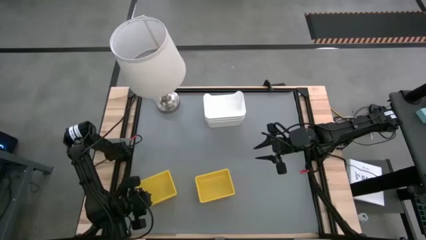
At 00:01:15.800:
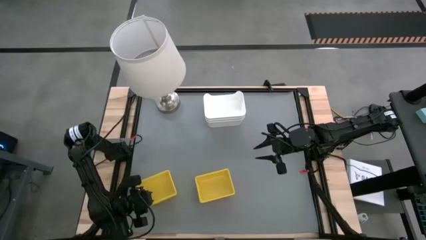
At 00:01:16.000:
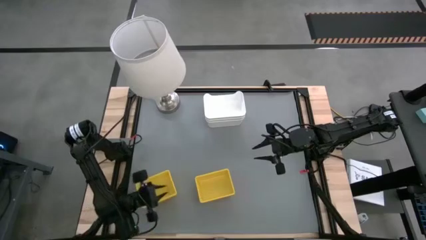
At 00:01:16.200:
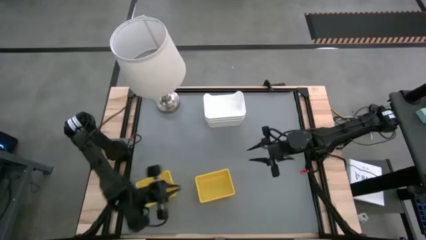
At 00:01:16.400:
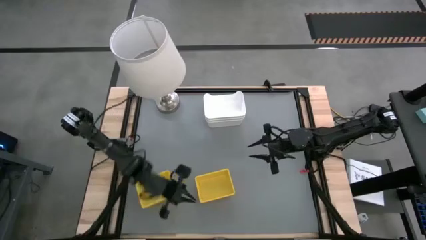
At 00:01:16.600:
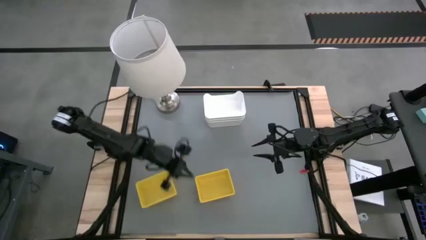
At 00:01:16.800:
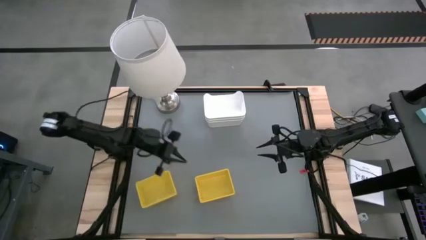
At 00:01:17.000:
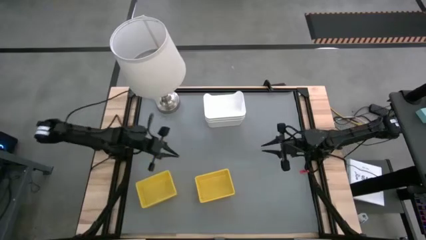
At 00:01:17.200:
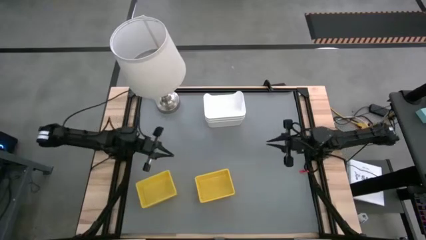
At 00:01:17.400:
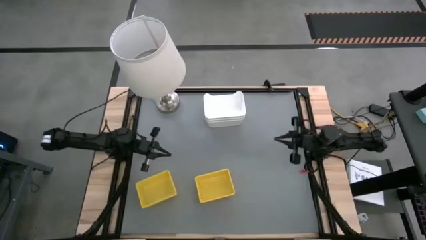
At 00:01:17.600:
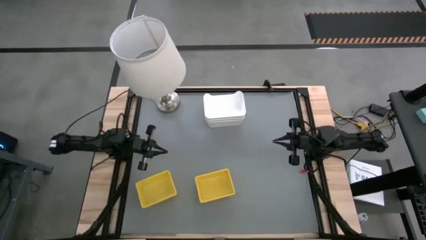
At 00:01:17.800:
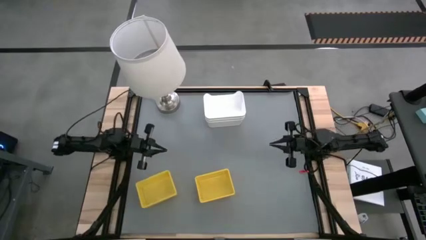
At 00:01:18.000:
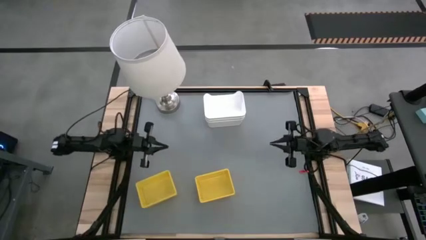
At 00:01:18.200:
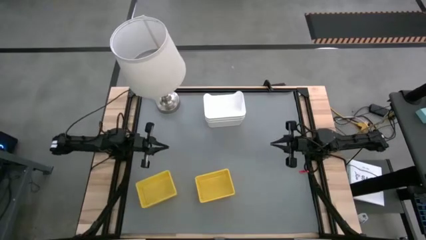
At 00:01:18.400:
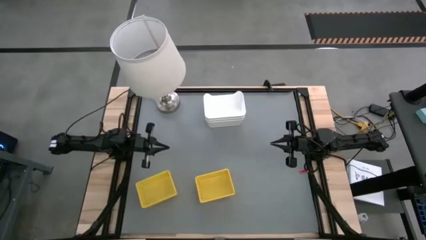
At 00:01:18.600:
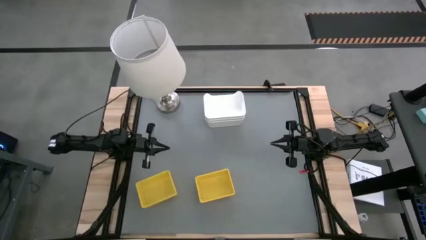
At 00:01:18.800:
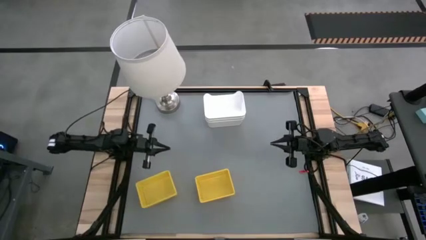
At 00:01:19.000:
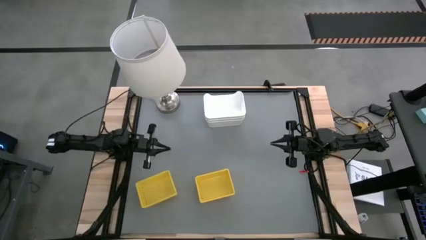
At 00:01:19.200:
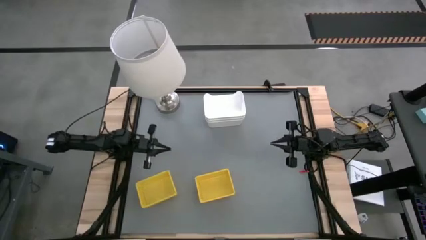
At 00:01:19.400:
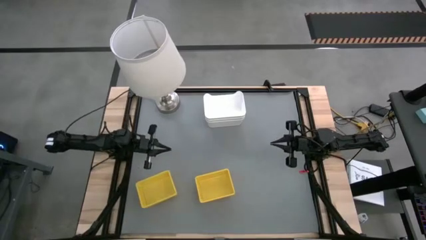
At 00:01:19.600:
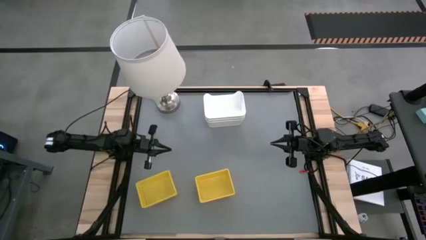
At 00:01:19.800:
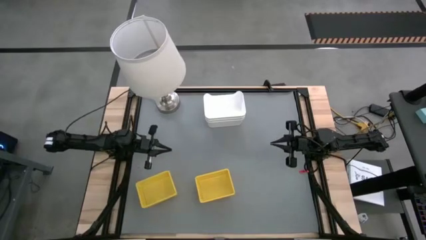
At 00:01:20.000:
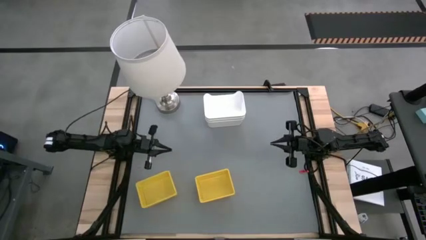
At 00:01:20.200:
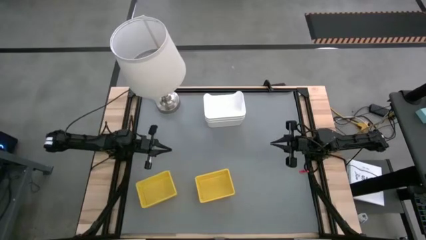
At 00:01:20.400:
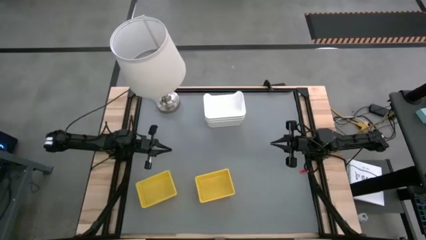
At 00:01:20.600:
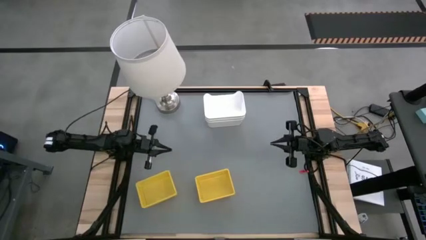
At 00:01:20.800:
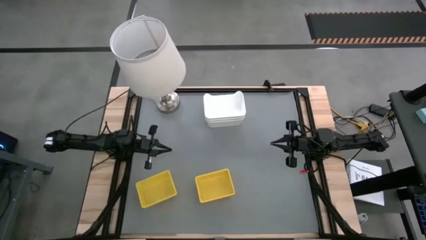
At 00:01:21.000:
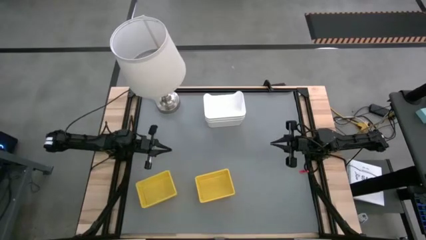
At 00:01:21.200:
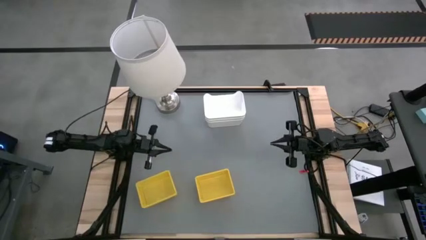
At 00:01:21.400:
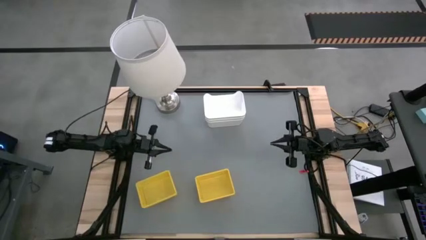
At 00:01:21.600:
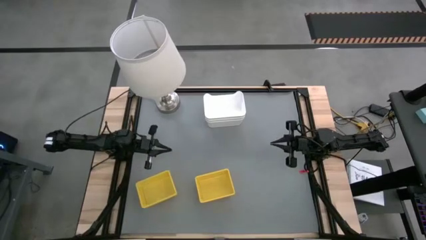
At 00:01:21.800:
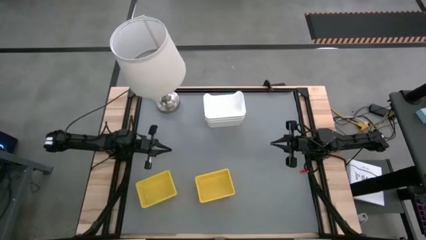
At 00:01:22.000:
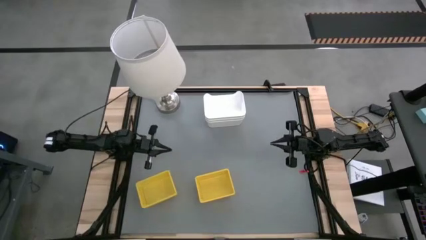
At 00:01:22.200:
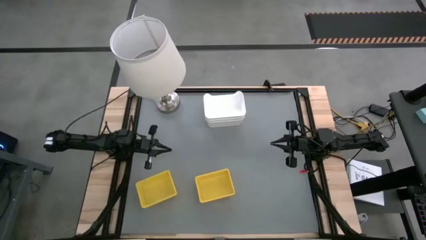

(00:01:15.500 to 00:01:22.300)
Return to Home Position

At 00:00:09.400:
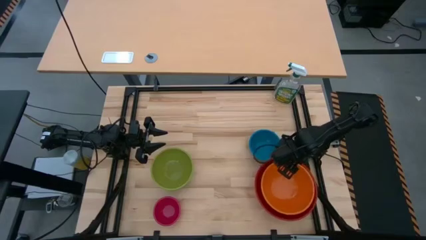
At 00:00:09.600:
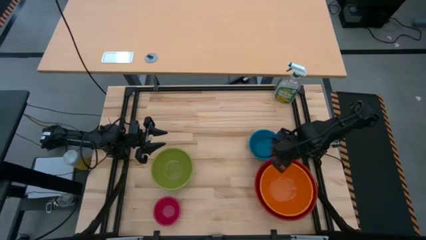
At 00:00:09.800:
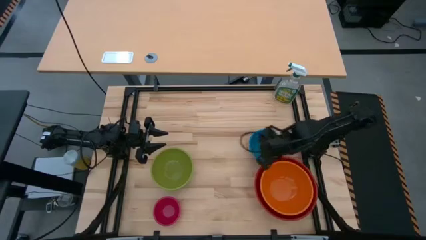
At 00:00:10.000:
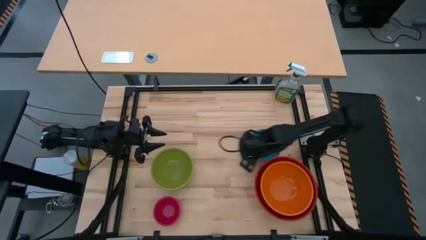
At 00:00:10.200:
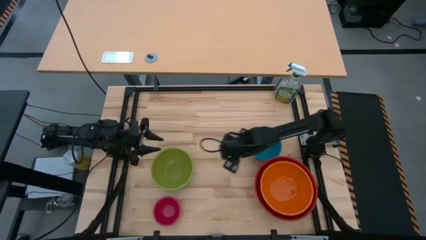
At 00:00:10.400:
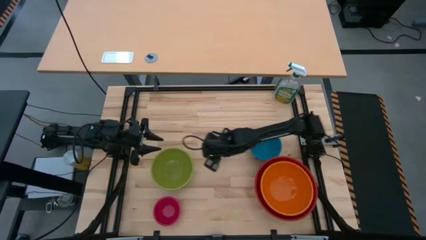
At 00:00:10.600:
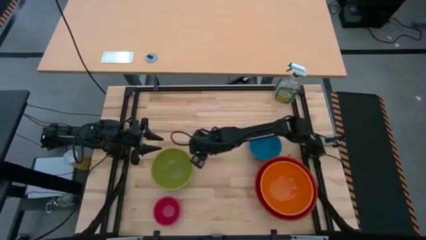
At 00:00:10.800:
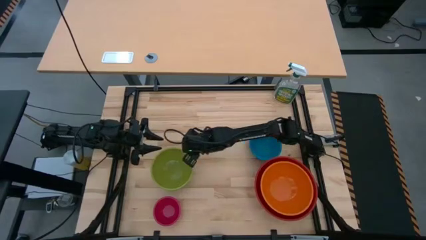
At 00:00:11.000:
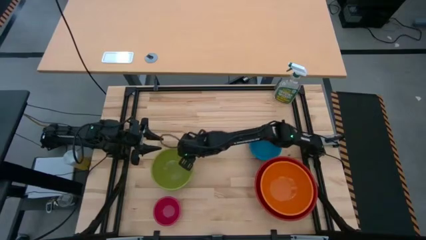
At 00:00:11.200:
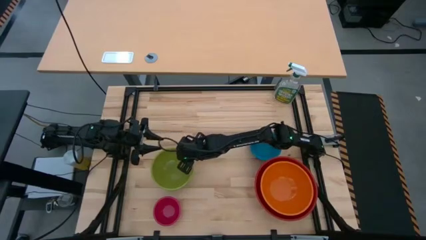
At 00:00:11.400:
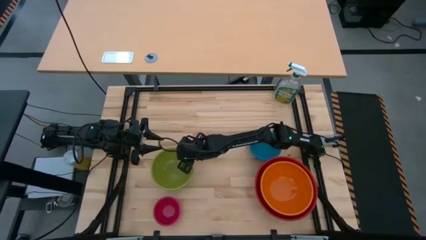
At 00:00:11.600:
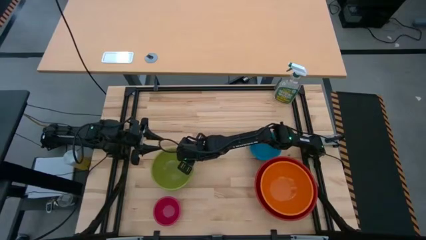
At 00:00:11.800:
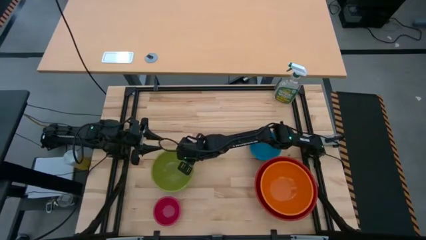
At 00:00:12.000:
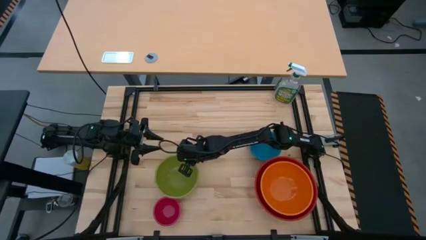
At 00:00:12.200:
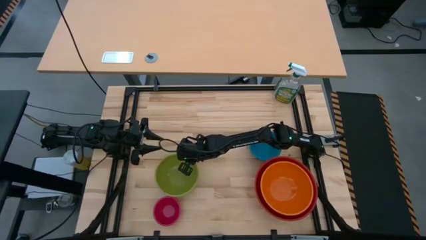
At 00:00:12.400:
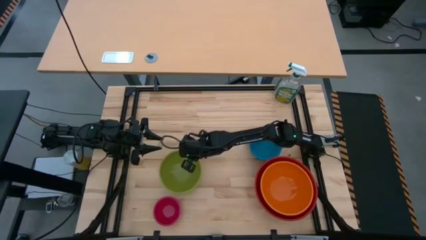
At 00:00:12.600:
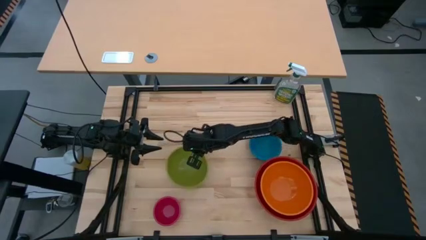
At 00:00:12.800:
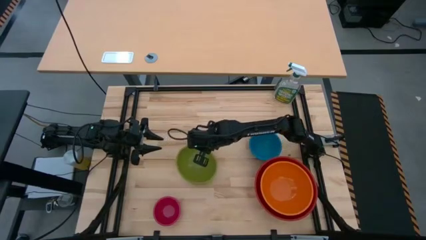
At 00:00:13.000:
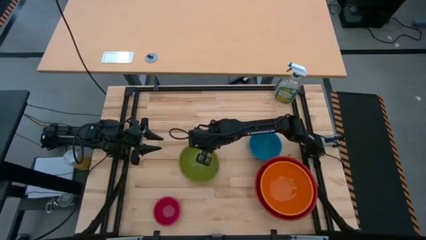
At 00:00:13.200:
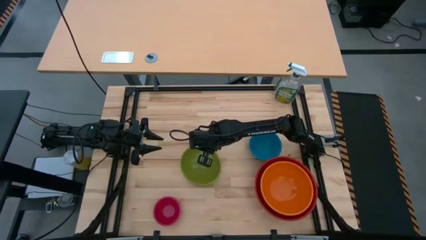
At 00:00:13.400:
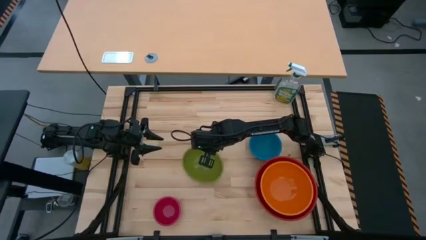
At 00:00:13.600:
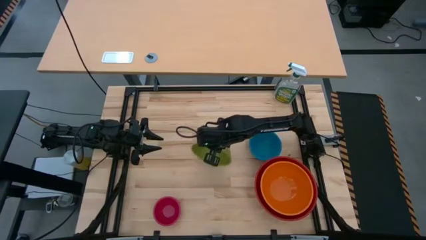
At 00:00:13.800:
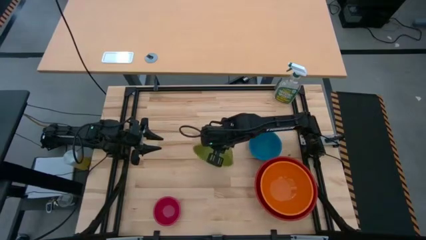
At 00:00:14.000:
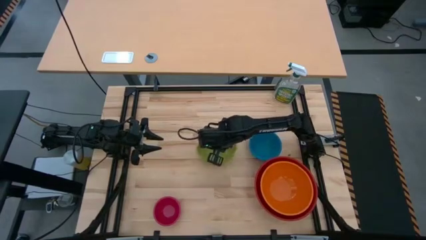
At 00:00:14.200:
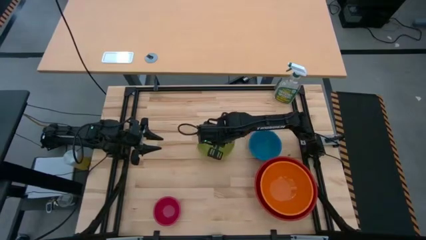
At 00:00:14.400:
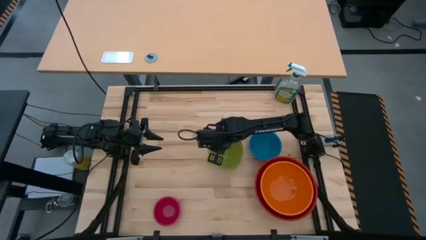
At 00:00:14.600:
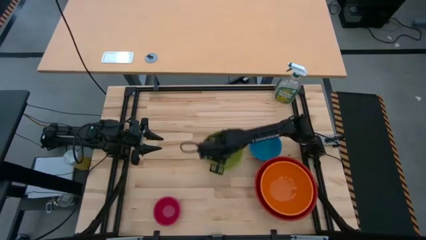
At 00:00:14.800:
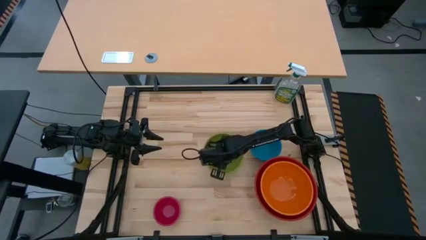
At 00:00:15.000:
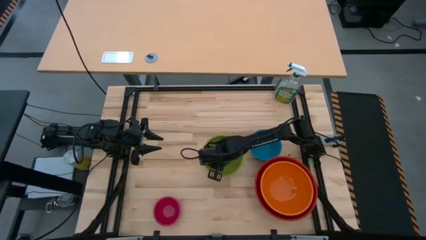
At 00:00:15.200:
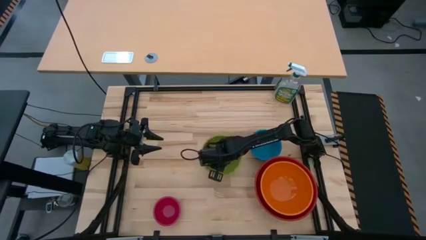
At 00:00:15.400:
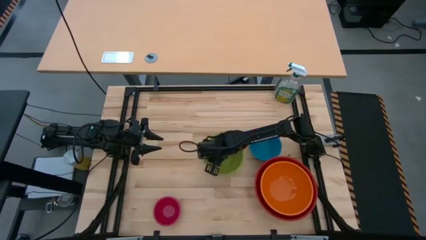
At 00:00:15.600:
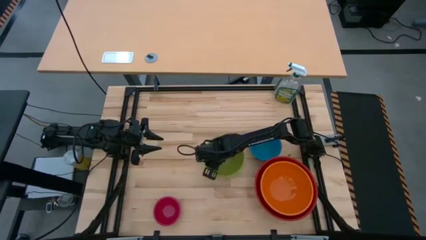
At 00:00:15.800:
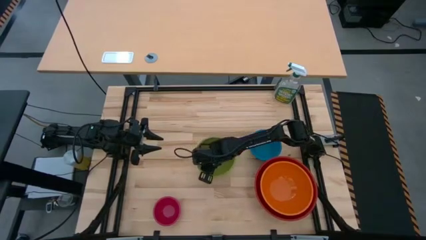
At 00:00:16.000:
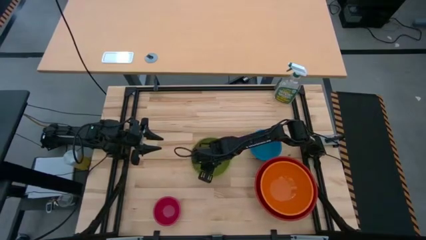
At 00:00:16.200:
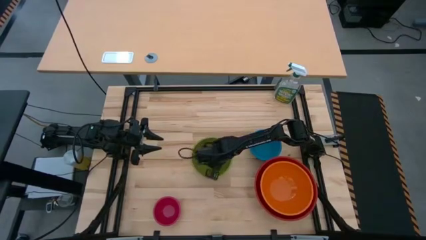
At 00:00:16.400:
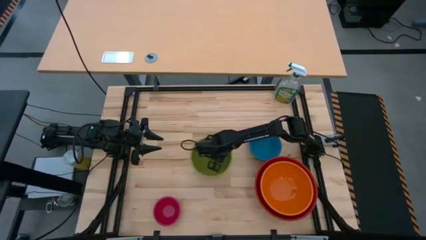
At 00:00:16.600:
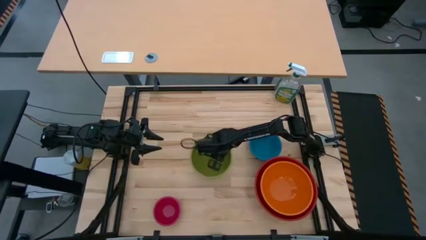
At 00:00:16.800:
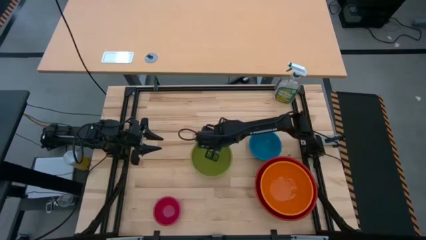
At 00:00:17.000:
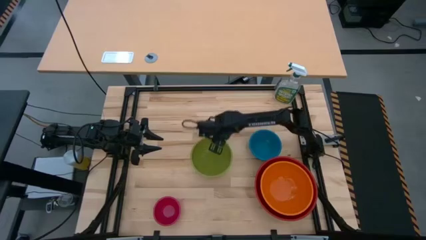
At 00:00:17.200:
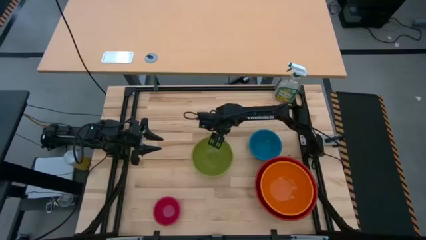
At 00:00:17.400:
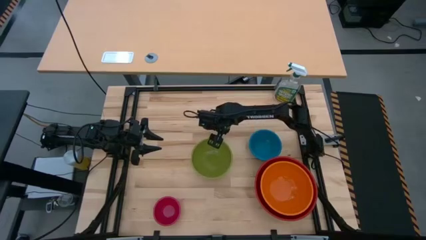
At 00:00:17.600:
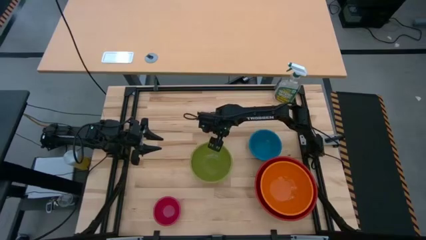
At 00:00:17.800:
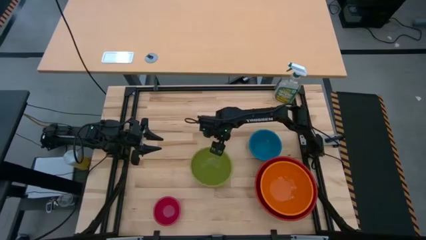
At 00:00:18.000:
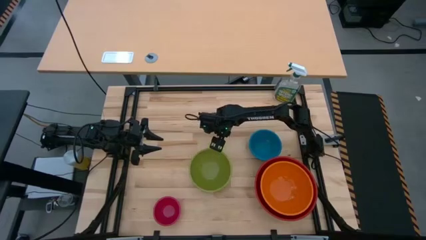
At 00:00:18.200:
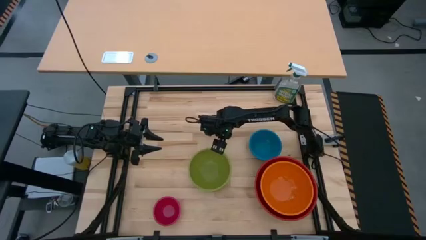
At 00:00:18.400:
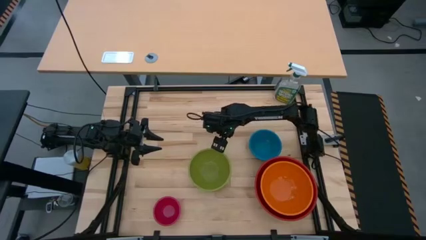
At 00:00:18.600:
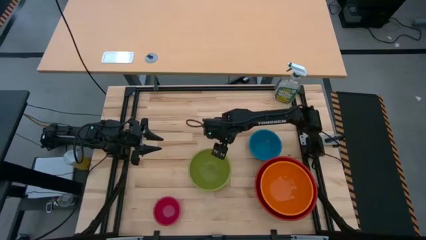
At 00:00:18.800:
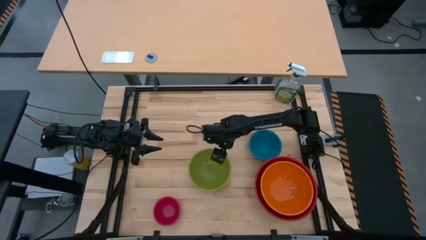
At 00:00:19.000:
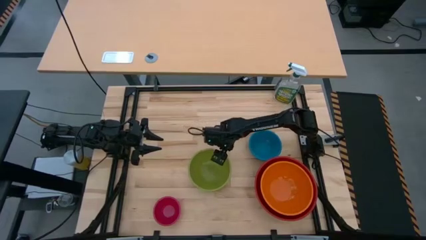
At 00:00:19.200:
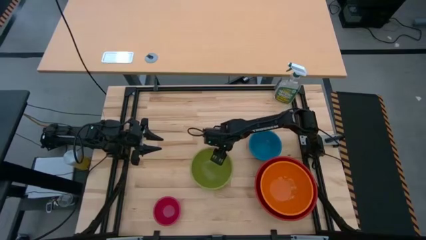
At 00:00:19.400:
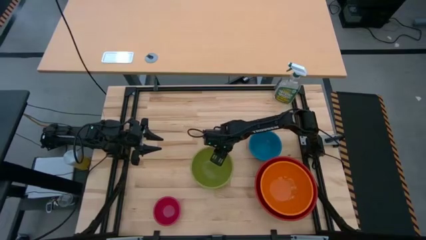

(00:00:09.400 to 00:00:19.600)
Stack the green bowl on top of the orange bowl

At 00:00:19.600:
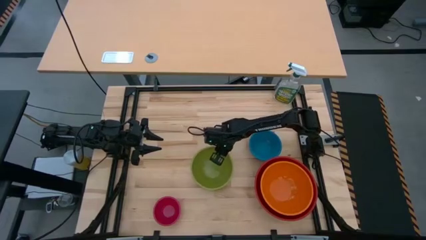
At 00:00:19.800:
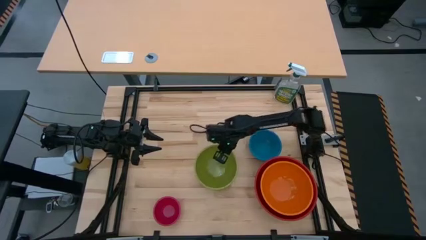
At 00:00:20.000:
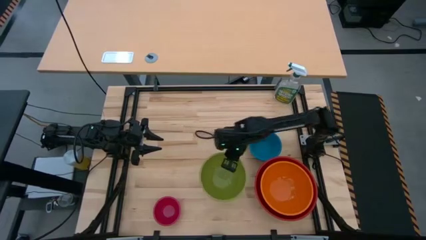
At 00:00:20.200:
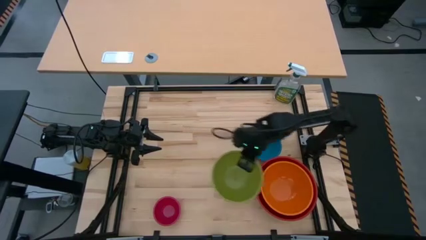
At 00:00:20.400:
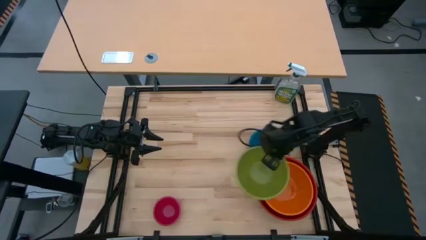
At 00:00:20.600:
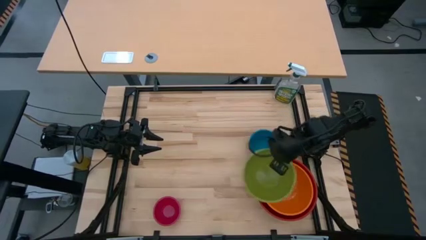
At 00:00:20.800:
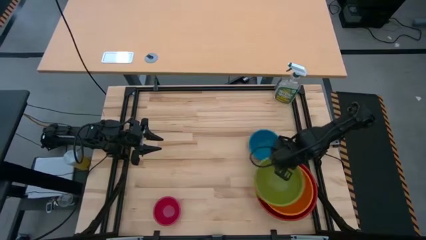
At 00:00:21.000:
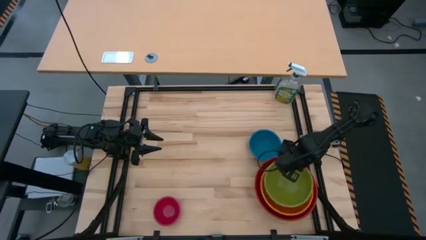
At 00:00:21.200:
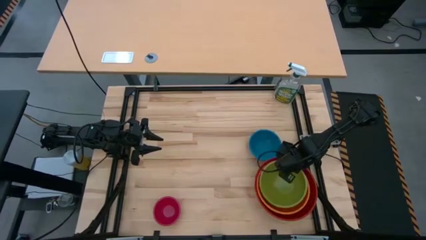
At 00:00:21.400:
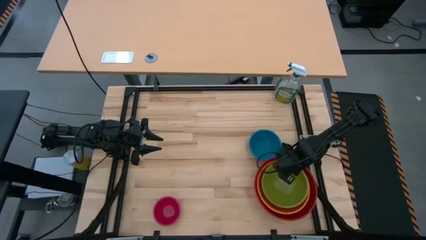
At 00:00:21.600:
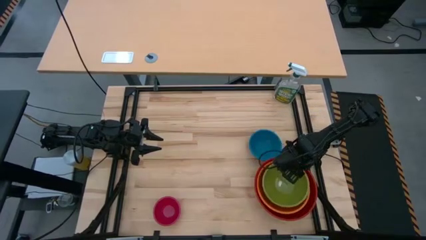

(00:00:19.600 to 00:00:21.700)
Stack the green bowl on top of the orange bowl
